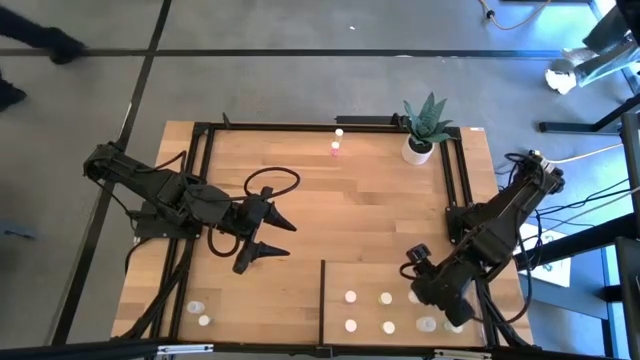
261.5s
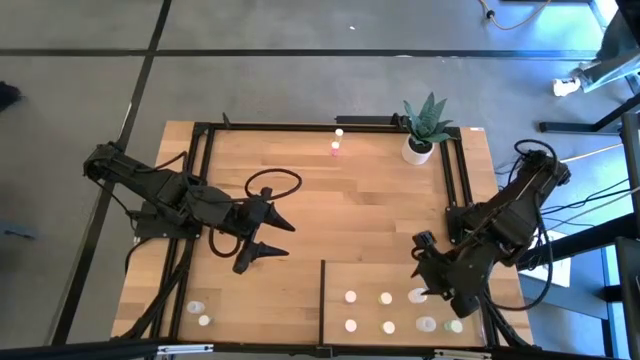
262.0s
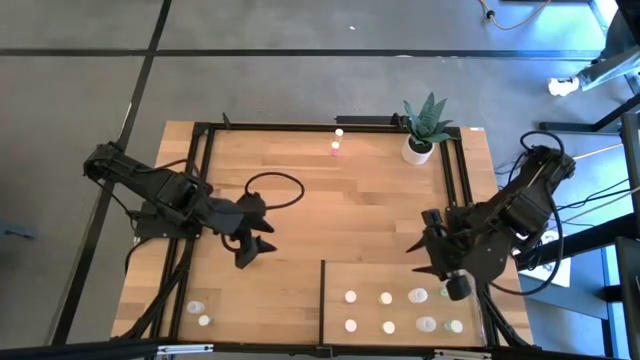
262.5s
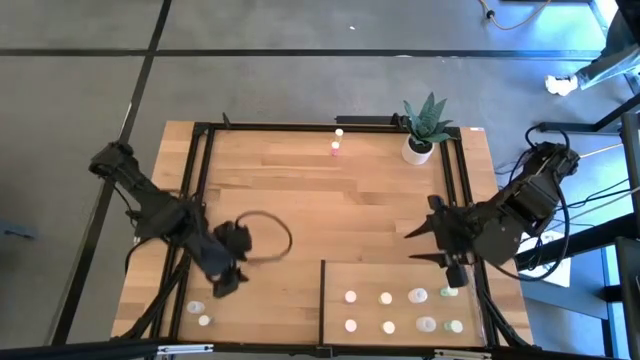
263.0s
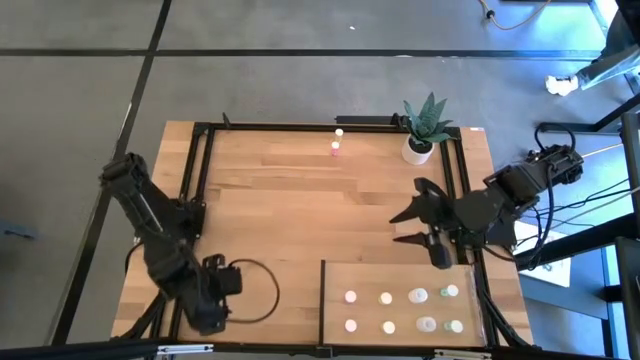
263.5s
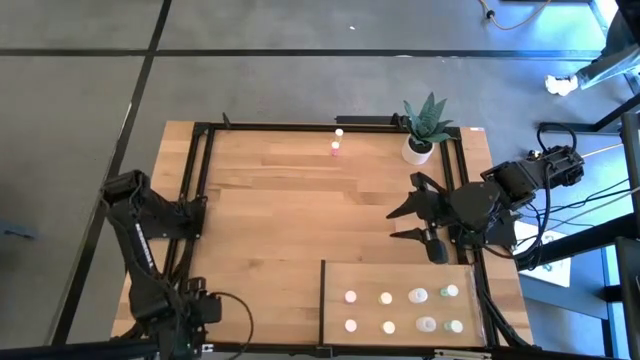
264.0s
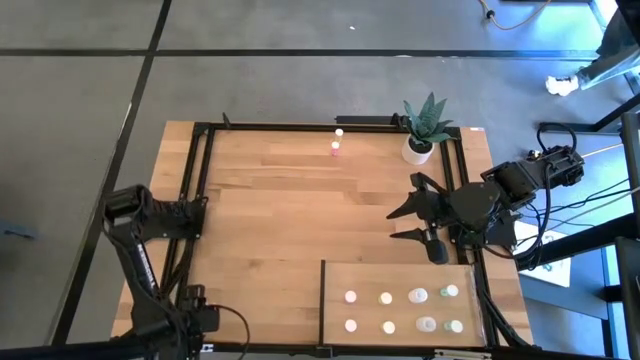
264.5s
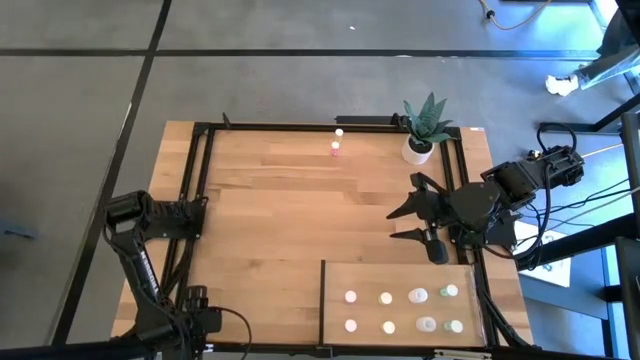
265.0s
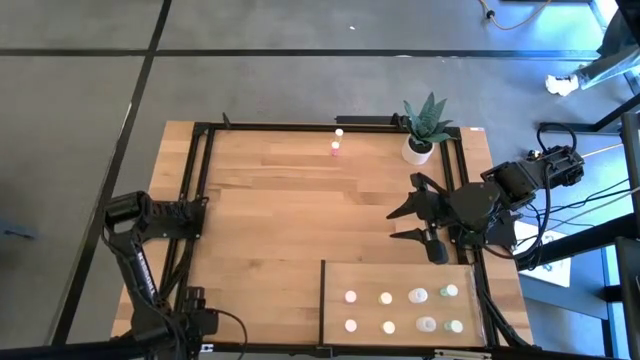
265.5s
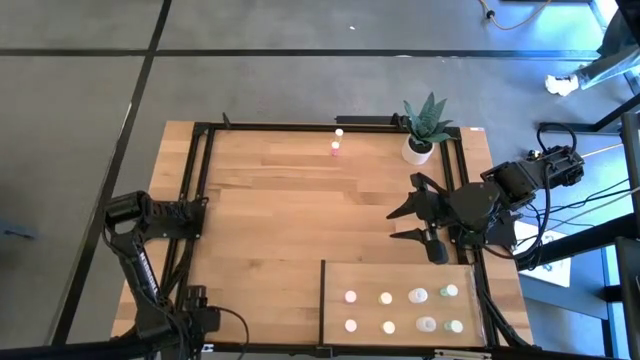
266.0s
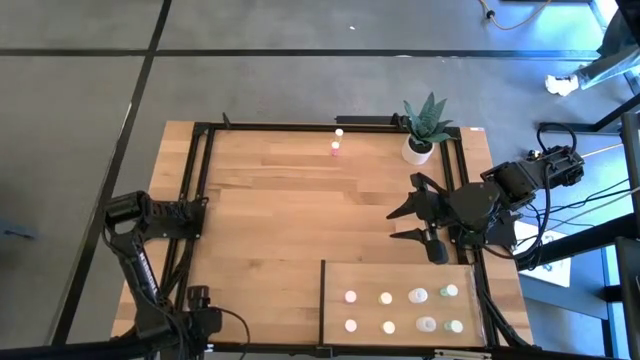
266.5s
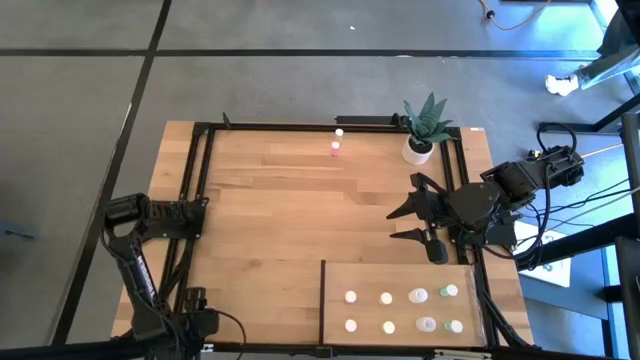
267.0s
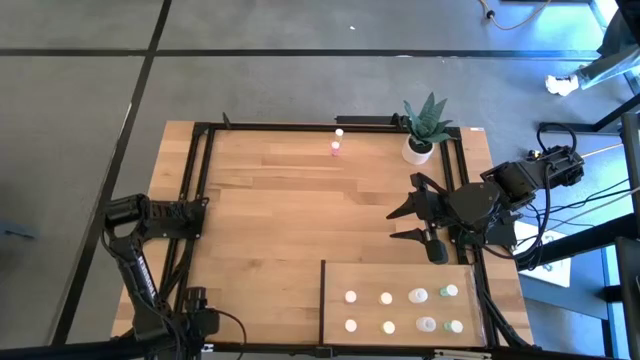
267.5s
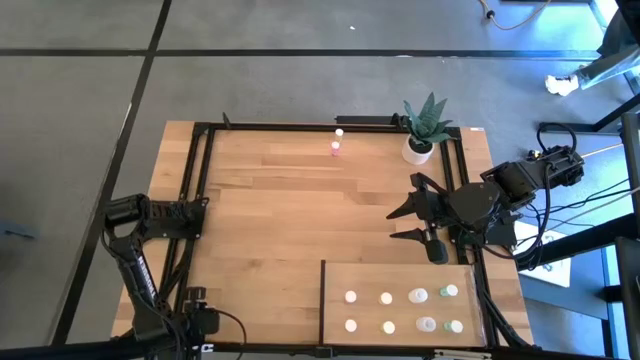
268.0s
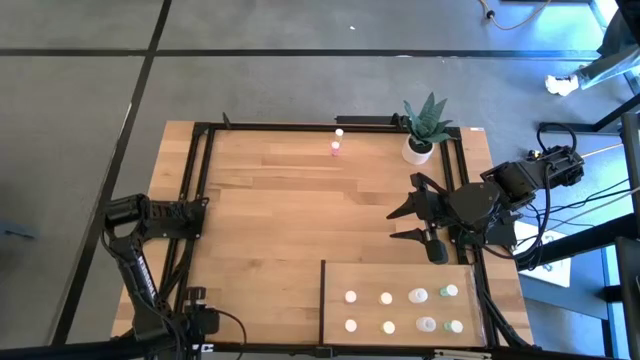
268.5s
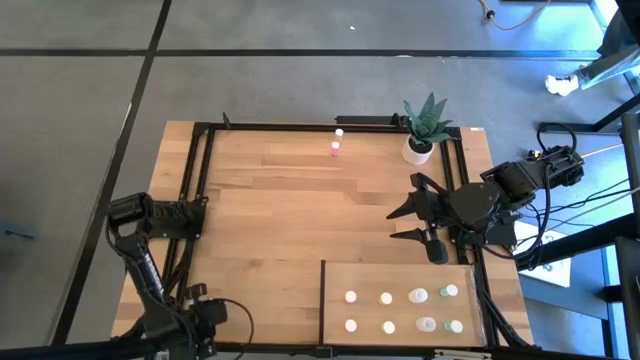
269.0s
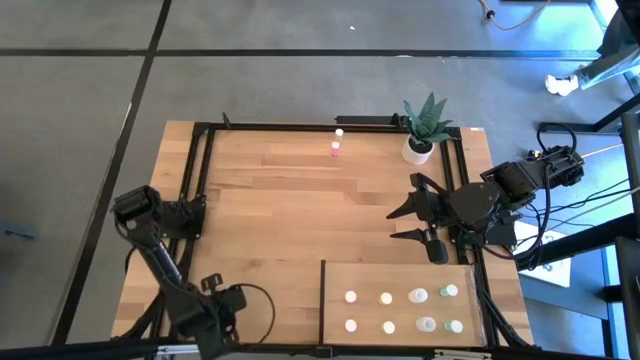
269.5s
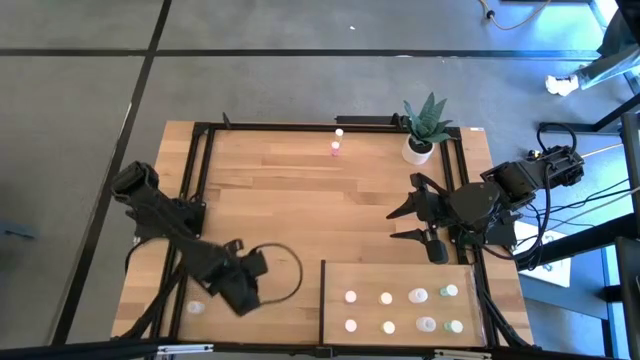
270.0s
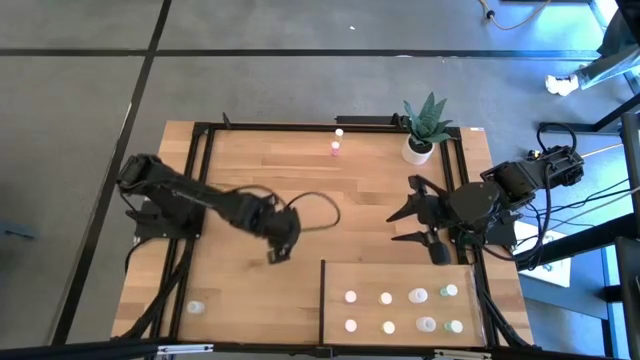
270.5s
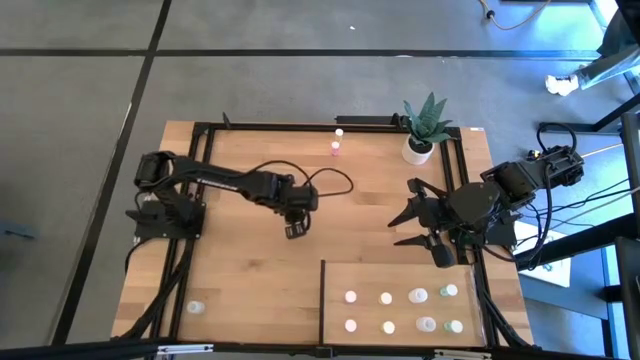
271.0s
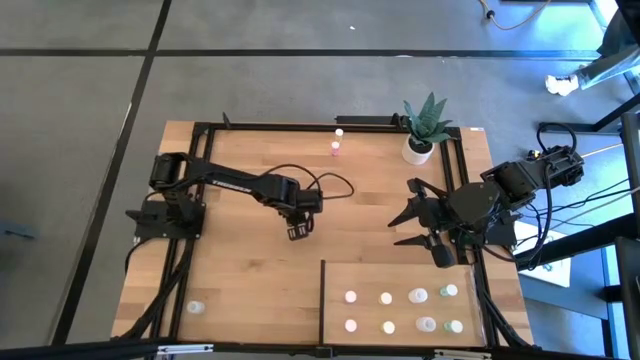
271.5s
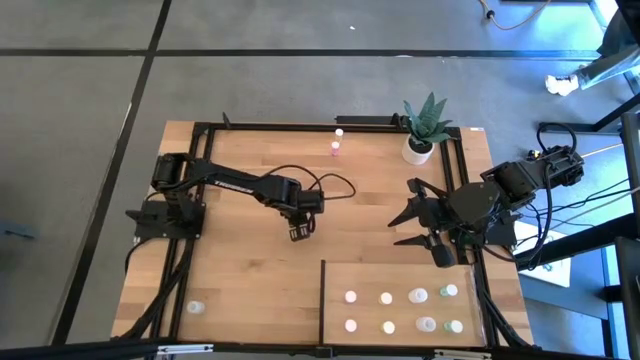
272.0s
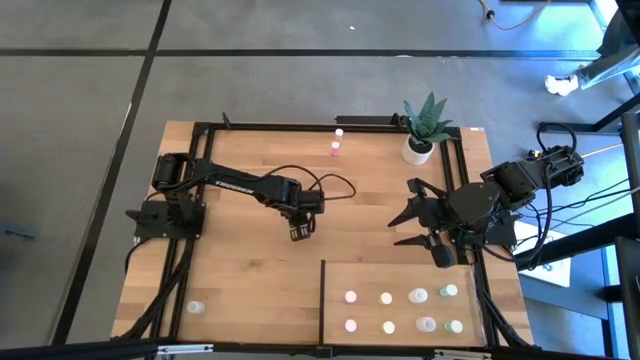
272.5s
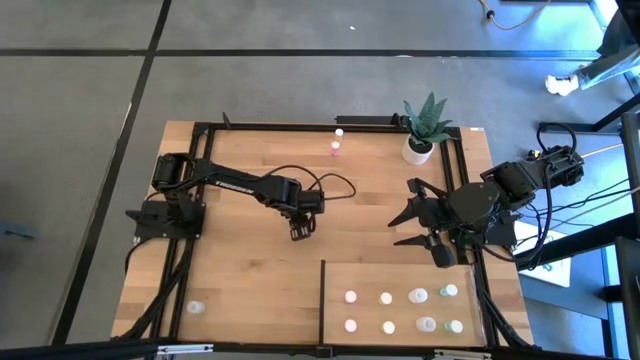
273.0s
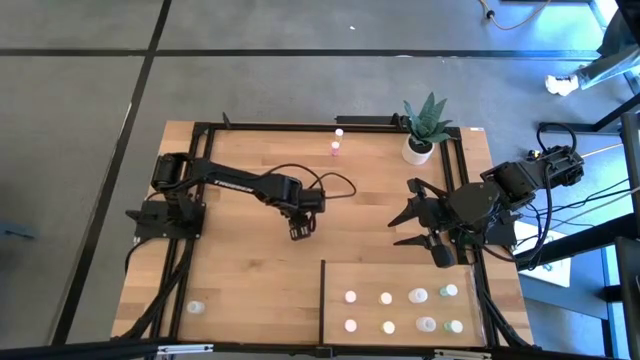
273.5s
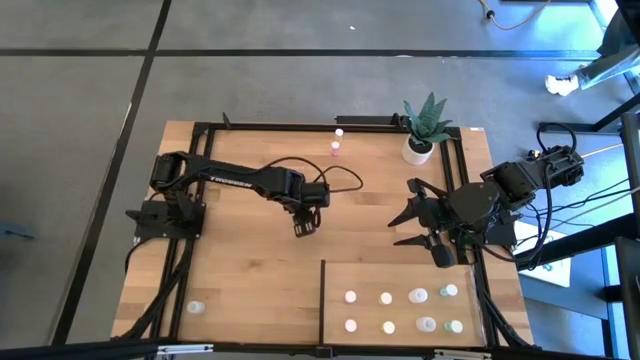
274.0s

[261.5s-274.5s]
Task: Pick and place medicine bottles onto shelf by color
Put the blue pill bottle on the shelf aligned with the other blue pill bottle

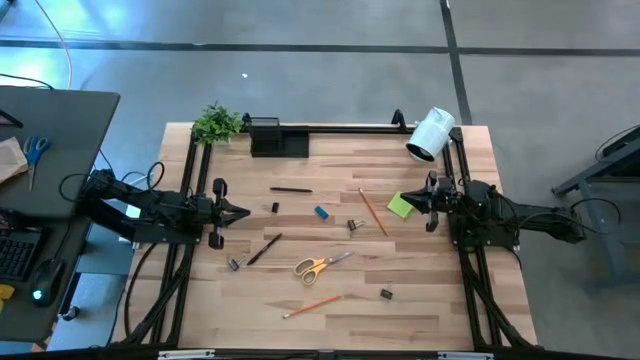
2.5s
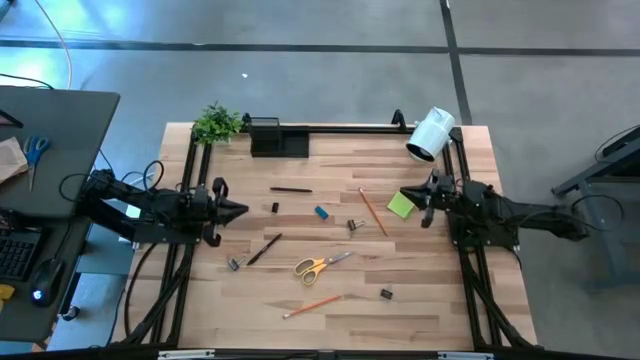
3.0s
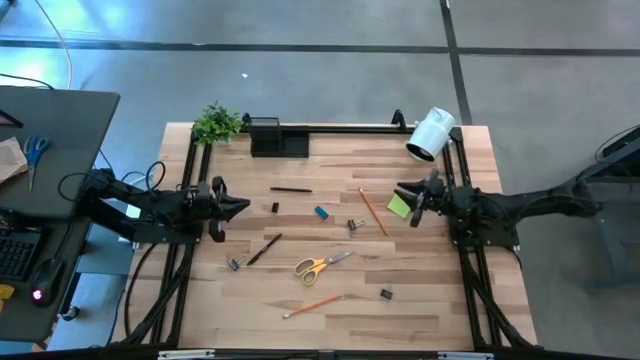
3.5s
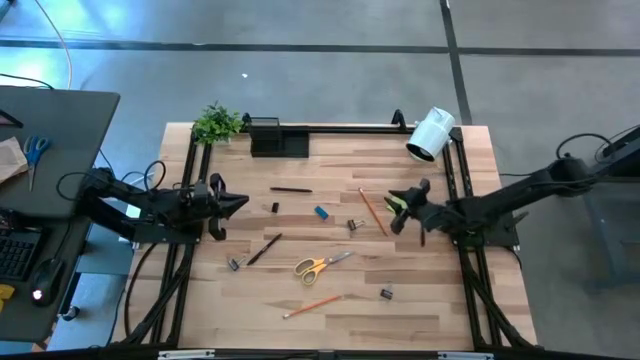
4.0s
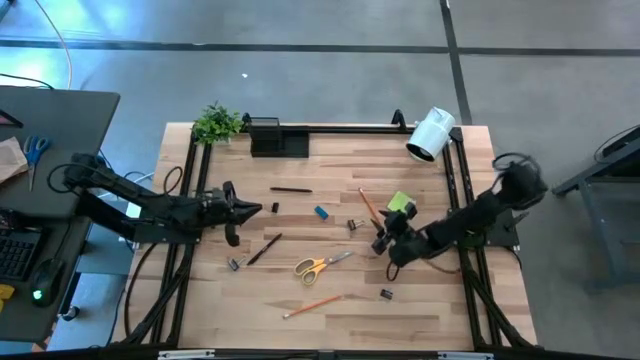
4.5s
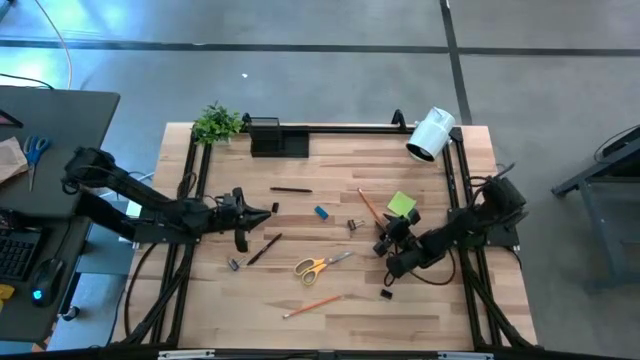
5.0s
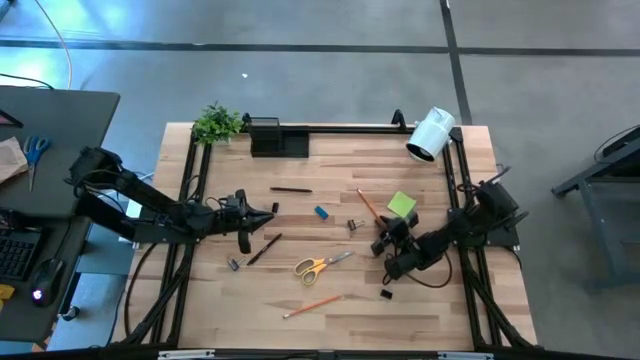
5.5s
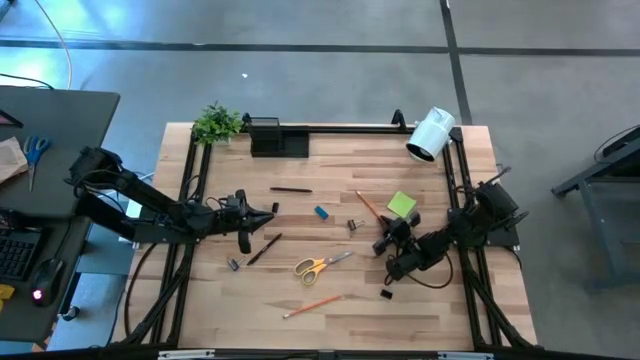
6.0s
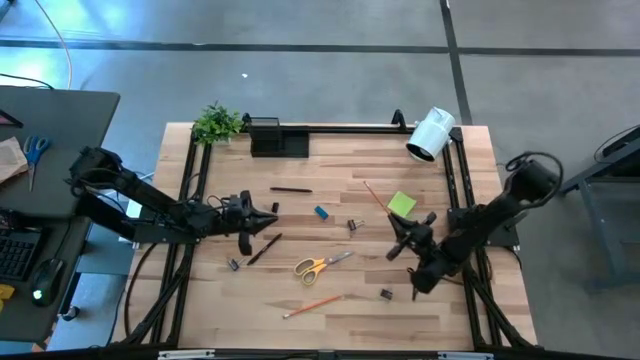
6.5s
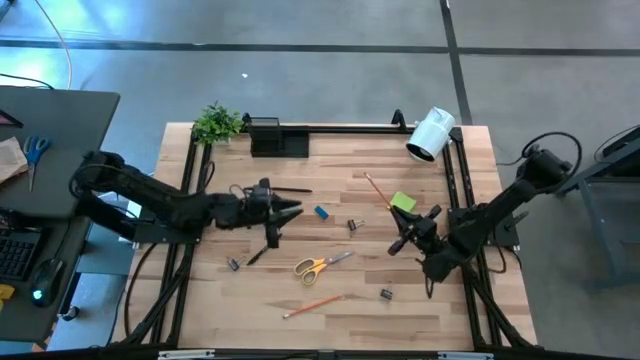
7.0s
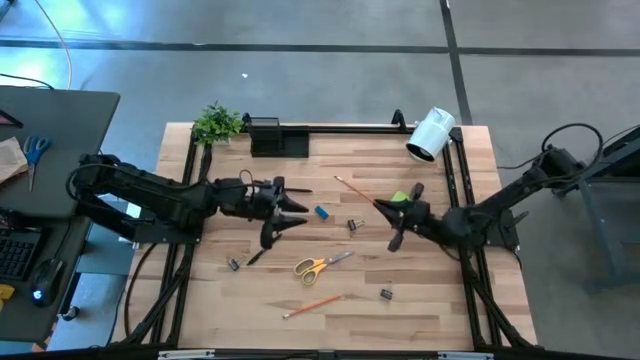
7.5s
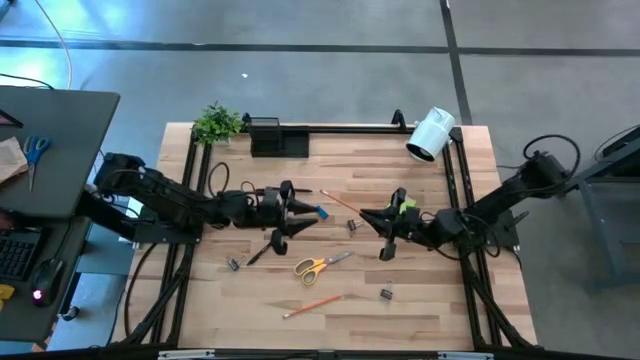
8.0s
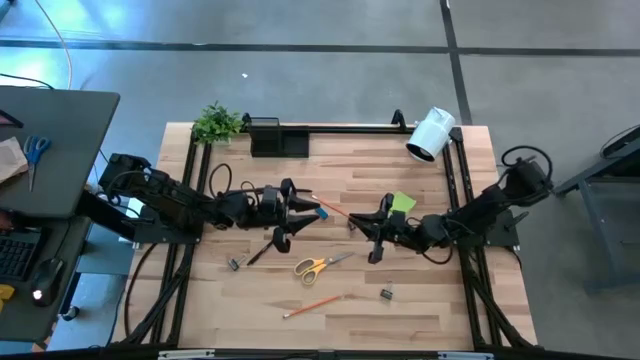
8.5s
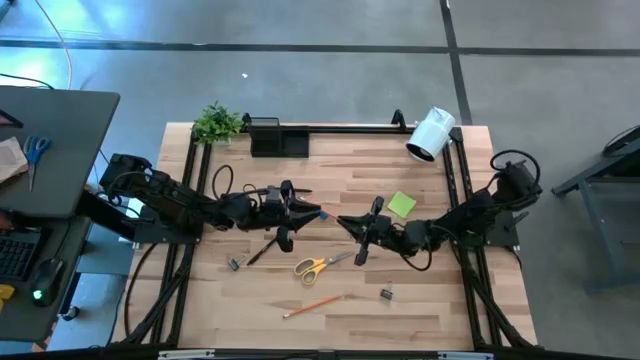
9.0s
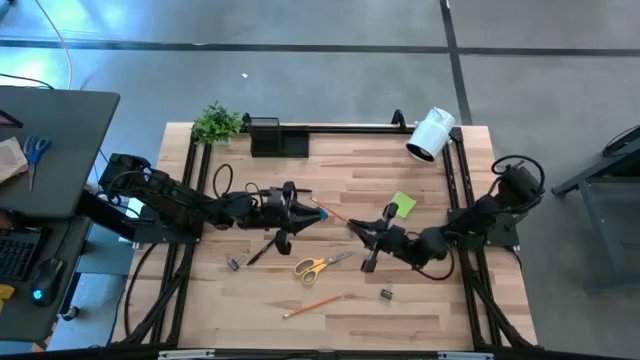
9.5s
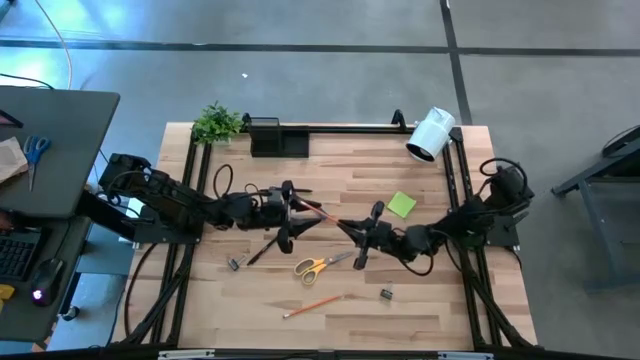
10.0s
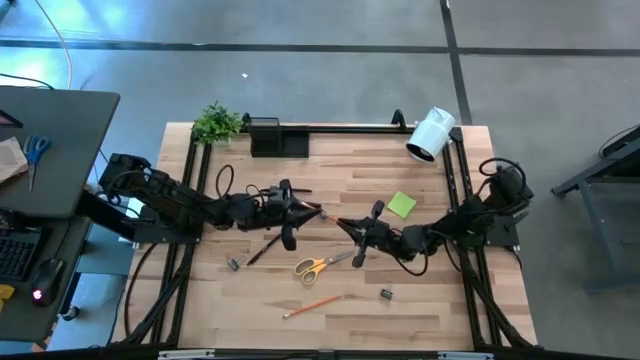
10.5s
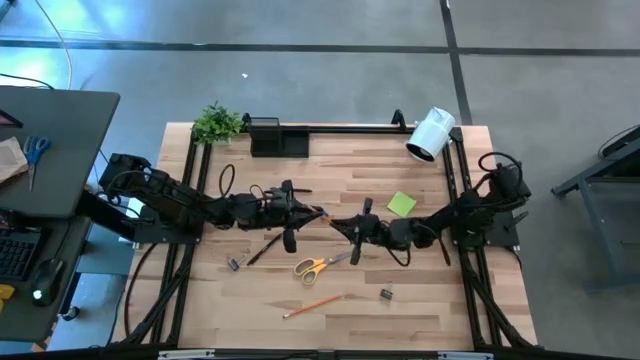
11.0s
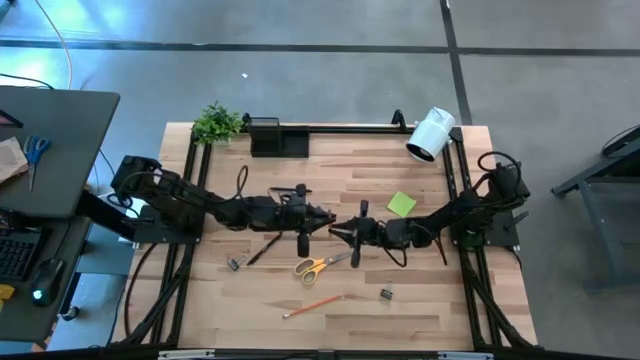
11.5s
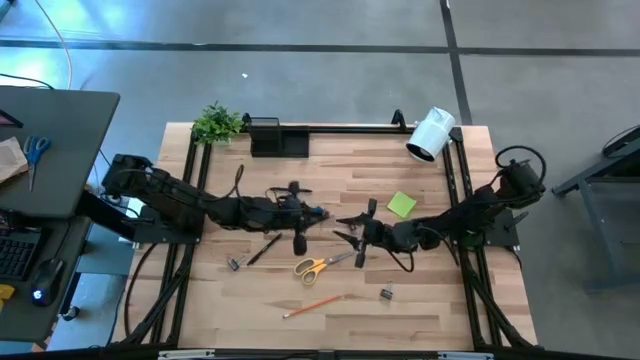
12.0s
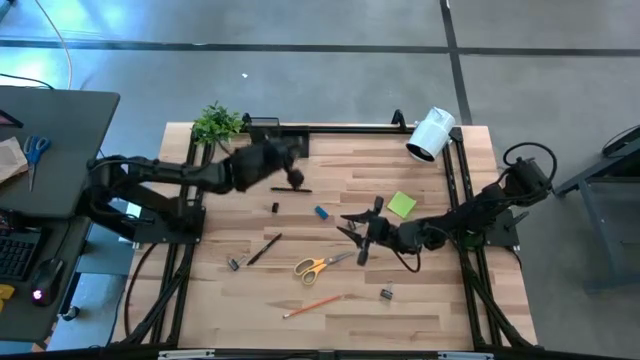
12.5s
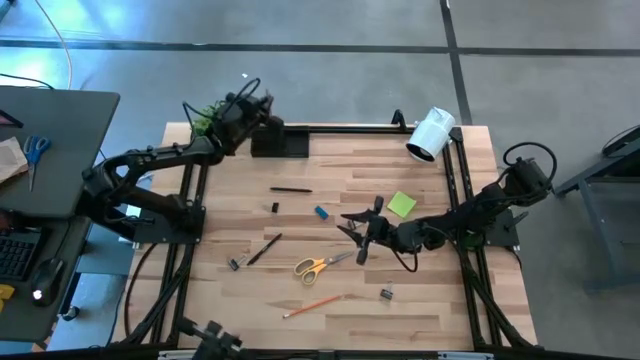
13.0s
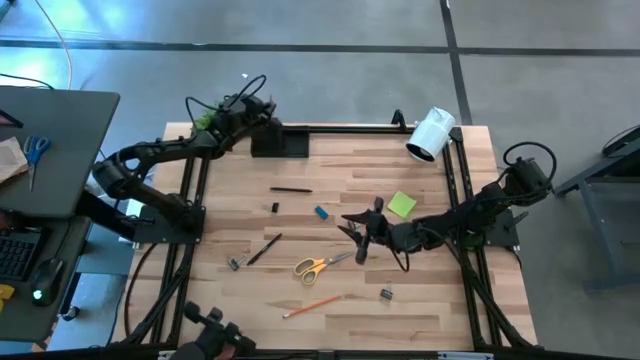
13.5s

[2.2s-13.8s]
Task: Pick and place office supplies into organizer
Put the top orange pencil into the top left section of the desk organizer
